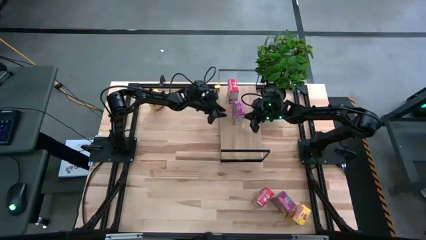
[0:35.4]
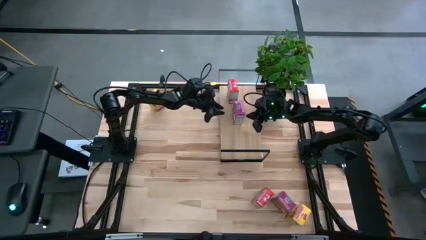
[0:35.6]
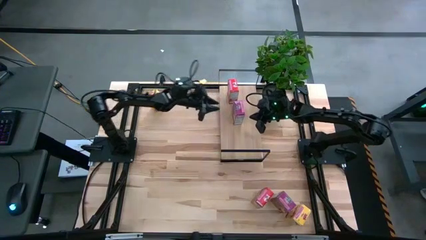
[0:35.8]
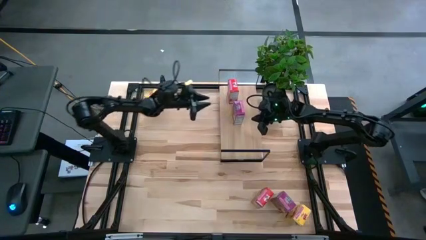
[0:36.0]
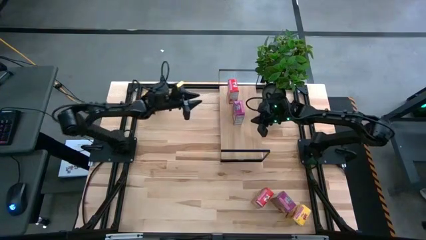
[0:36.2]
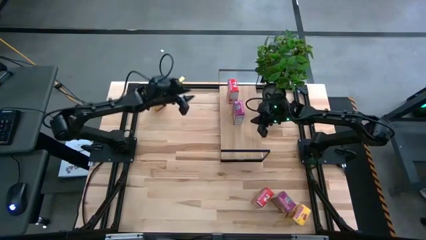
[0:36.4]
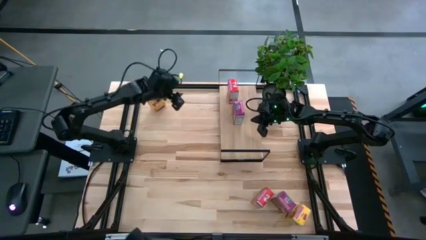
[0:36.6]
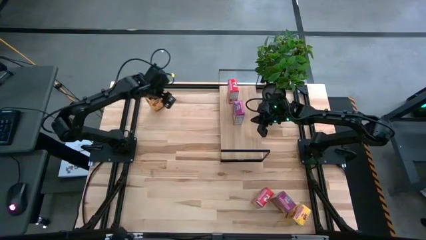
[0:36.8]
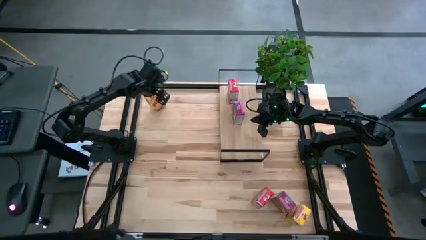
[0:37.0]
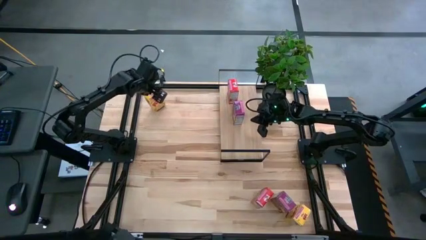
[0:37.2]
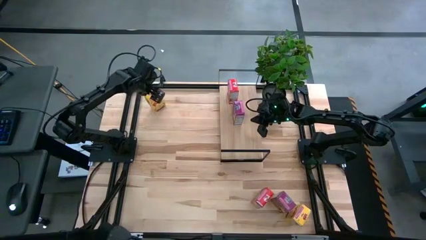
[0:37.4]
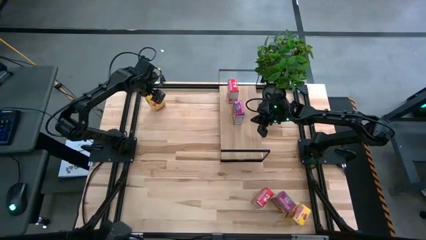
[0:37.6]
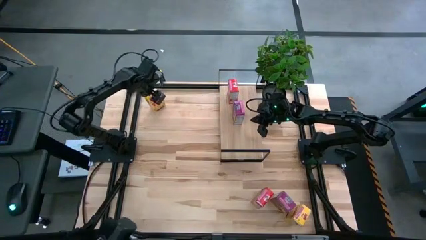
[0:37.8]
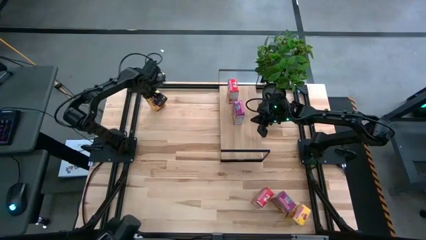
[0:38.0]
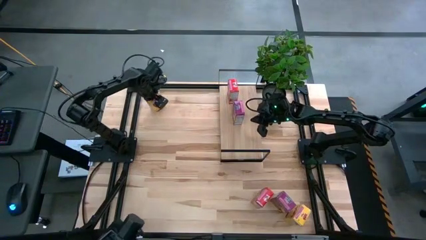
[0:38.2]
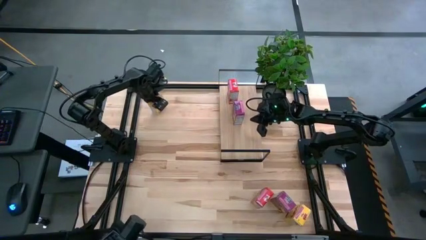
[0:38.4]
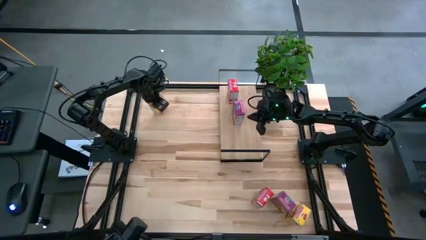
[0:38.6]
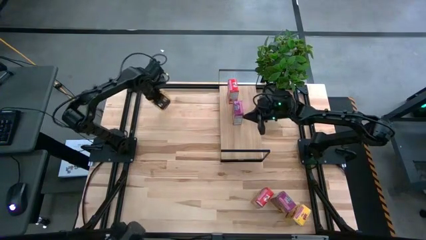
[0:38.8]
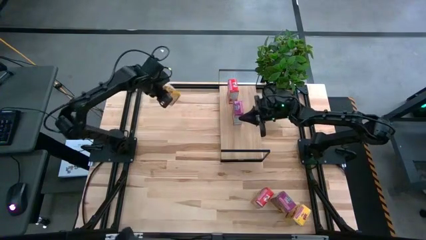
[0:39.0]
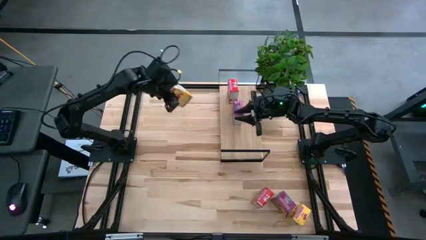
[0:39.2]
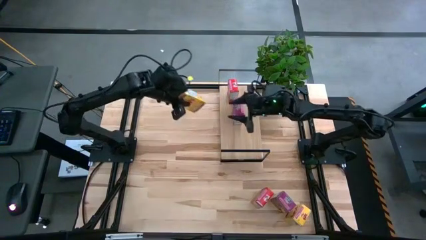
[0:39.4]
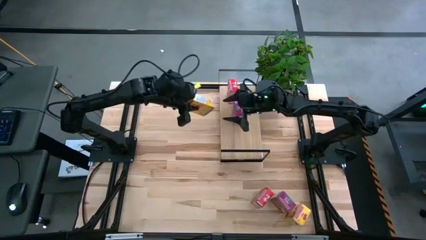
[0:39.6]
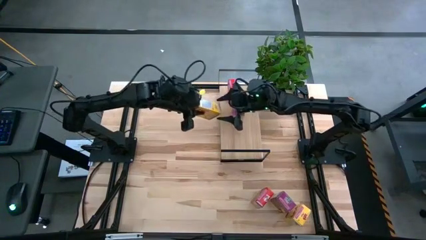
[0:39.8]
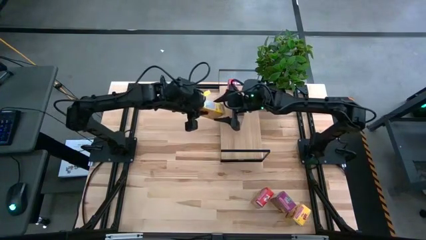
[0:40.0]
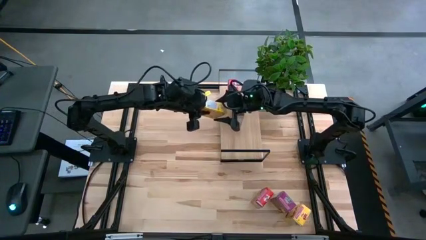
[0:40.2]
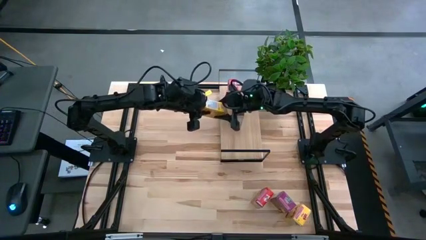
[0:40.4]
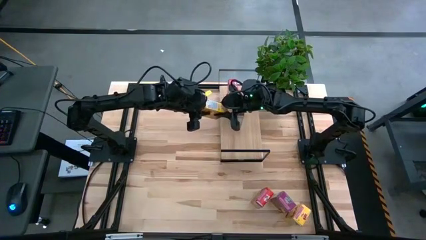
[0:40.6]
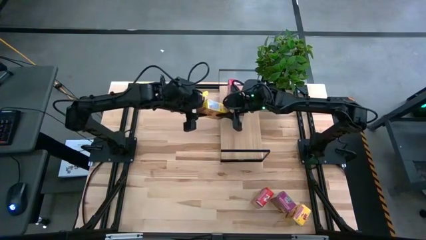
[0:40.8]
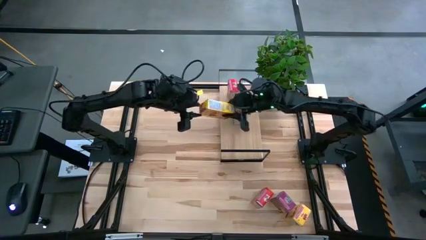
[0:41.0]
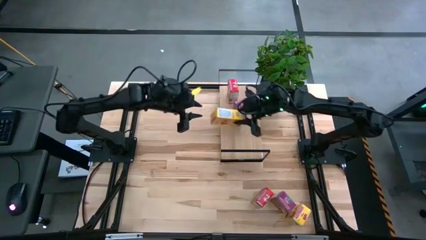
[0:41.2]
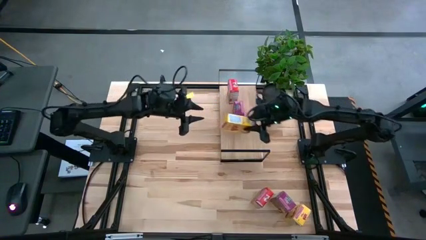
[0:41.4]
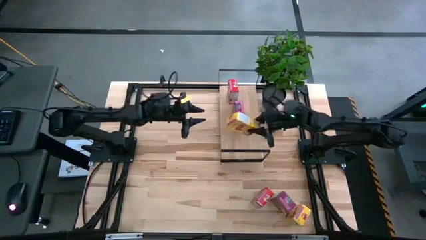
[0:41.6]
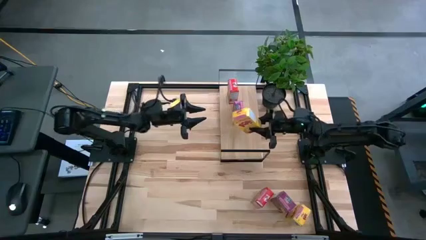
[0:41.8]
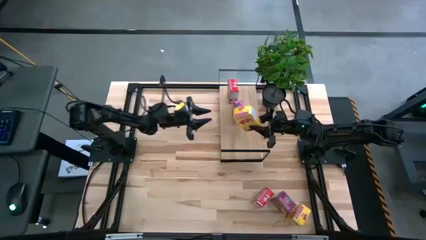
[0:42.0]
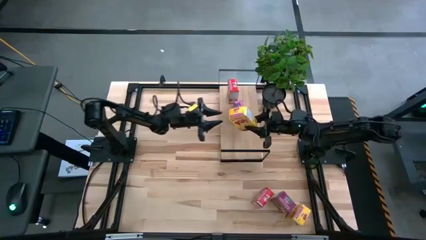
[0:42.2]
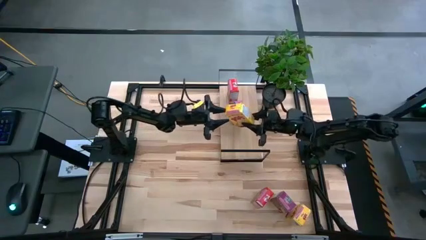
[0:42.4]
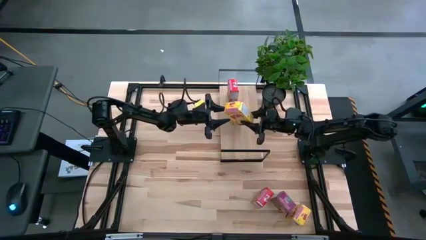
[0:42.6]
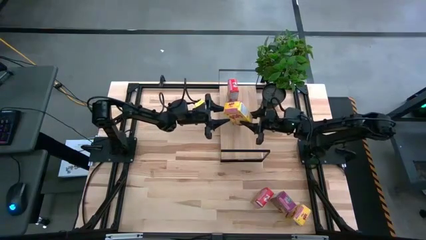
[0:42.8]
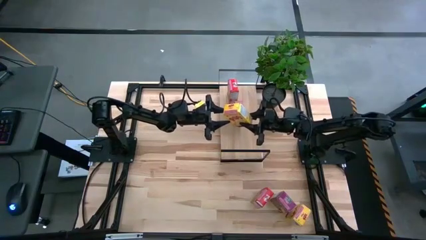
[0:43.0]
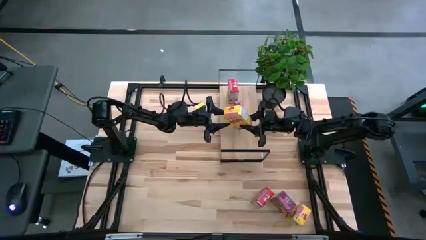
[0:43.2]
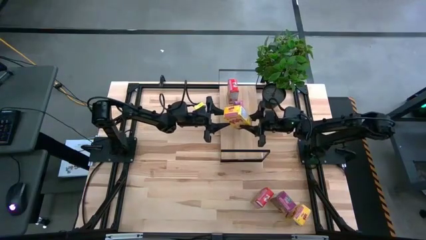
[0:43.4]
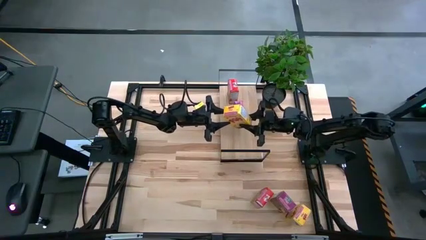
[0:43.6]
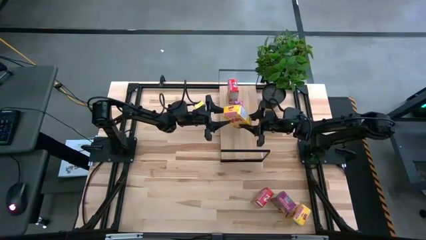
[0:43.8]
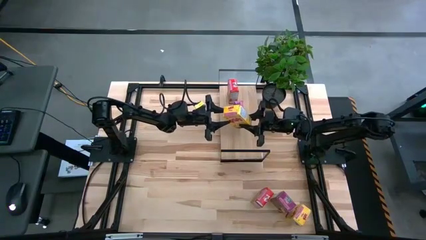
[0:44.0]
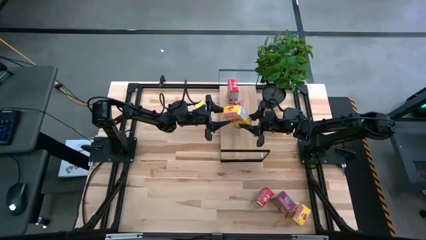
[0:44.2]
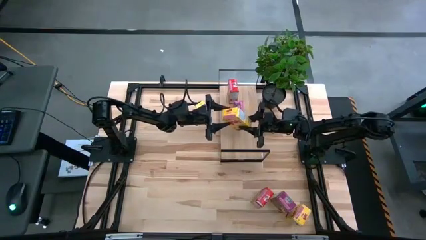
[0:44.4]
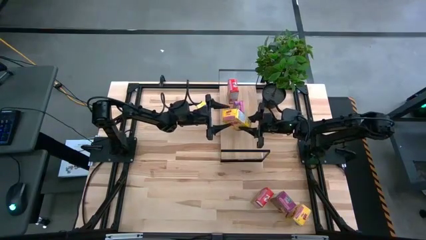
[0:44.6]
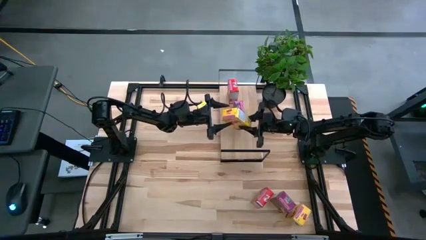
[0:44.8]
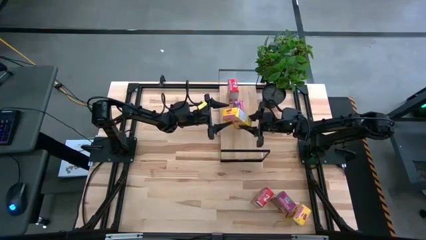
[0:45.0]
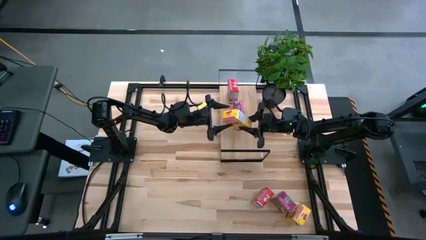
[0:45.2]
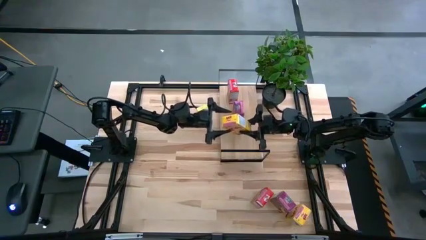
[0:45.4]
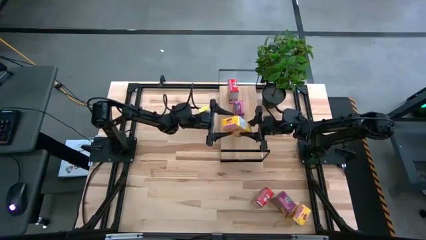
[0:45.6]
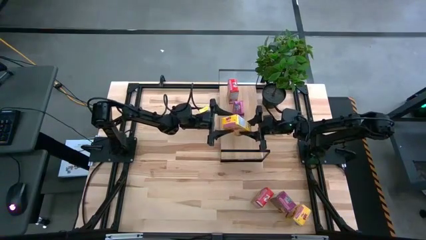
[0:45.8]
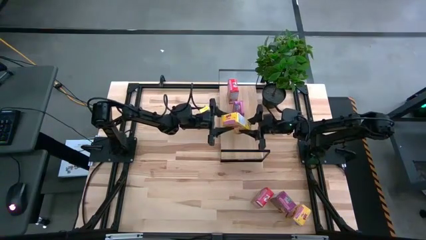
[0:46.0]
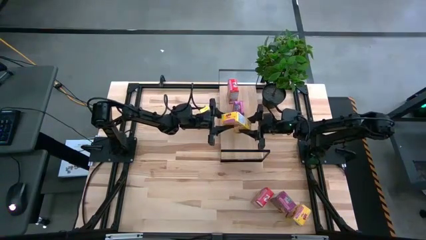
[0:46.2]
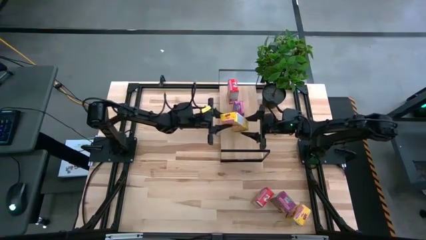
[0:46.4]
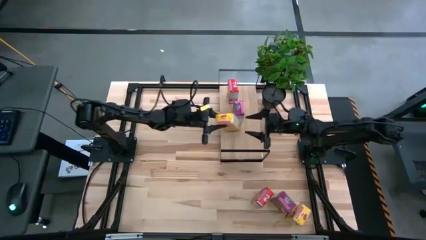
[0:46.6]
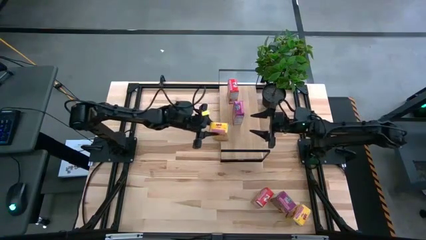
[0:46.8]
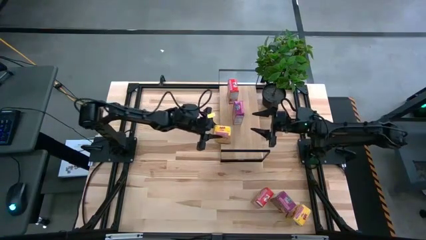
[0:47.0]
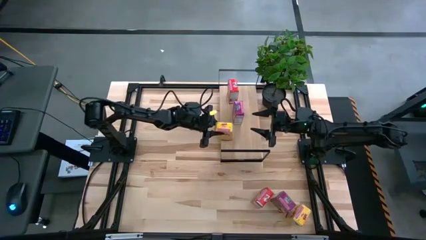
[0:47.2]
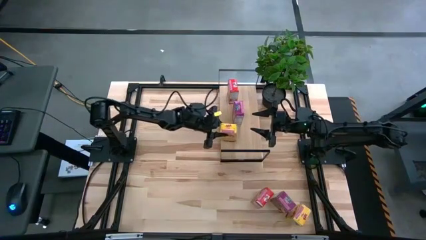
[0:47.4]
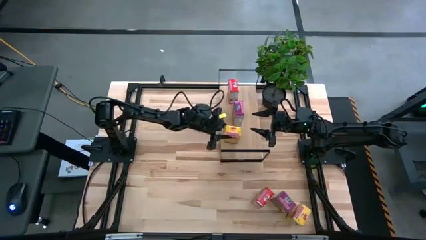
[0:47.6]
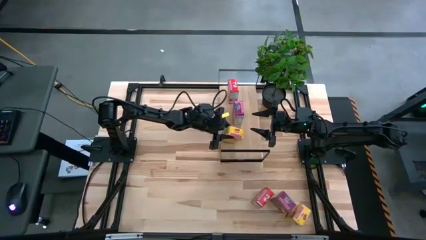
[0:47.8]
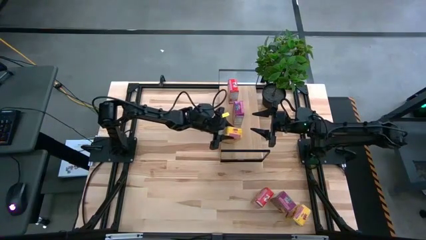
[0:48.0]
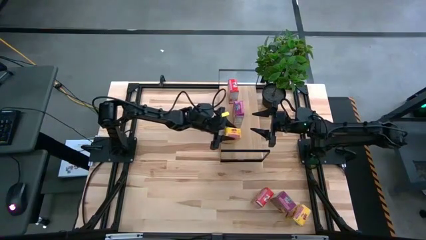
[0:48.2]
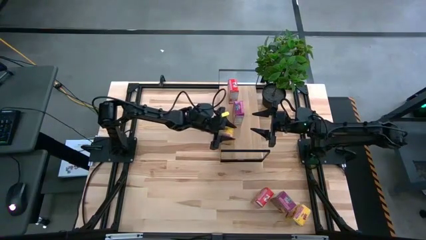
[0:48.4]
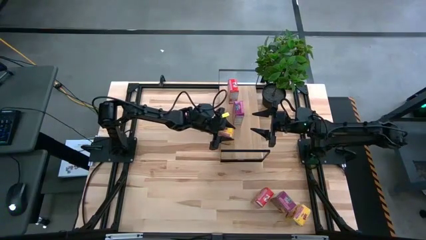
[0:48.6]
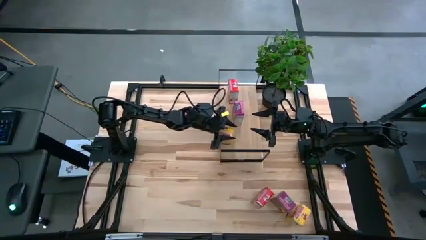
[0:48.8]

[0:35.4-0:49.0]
Task: Stack cereal on shelf
Put the top yellow cereal box on the shelf
